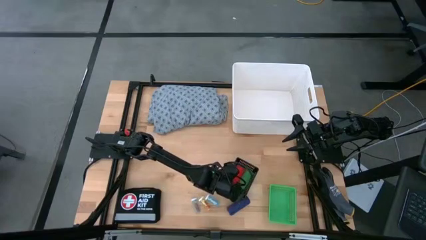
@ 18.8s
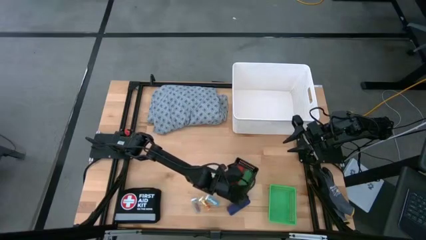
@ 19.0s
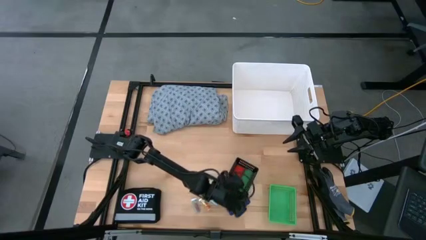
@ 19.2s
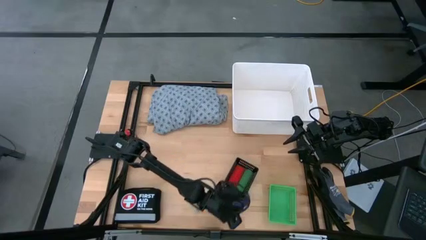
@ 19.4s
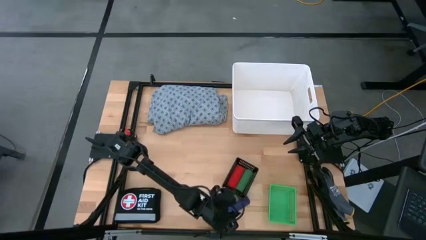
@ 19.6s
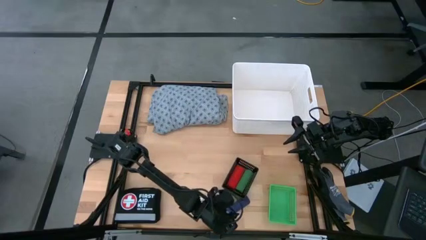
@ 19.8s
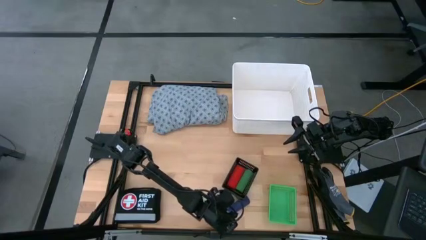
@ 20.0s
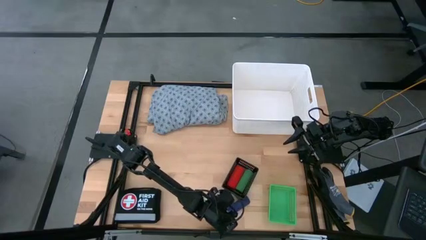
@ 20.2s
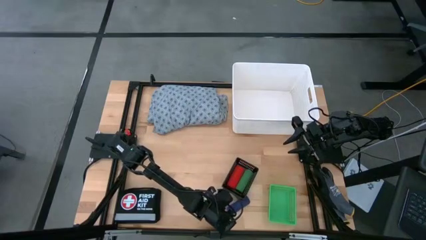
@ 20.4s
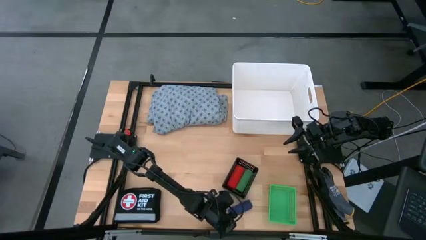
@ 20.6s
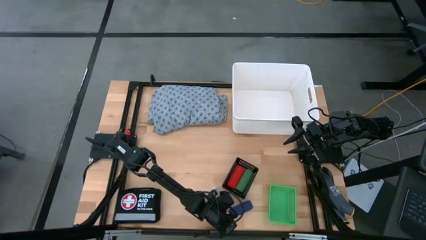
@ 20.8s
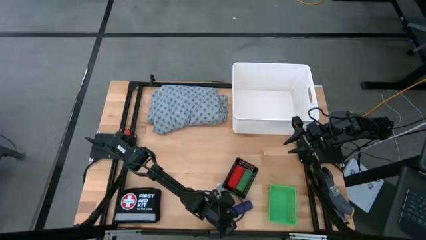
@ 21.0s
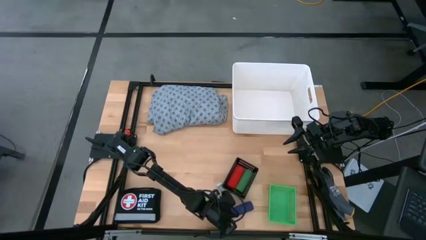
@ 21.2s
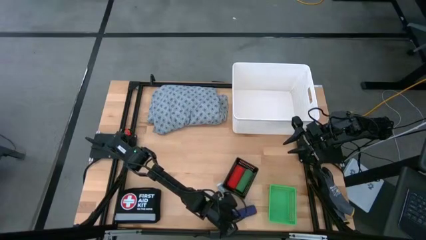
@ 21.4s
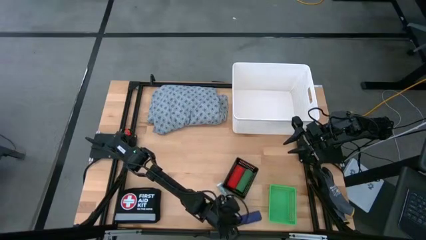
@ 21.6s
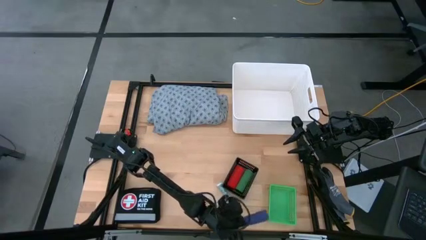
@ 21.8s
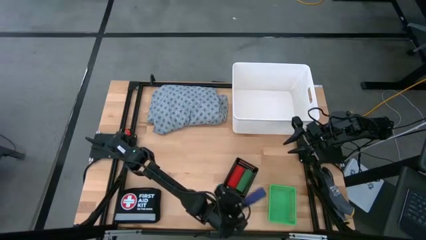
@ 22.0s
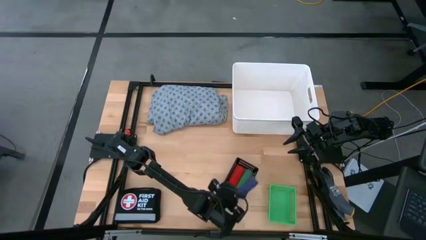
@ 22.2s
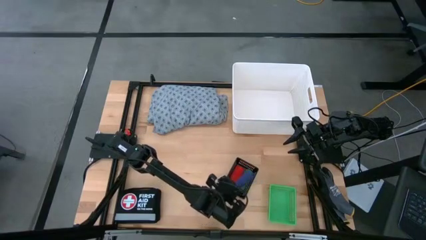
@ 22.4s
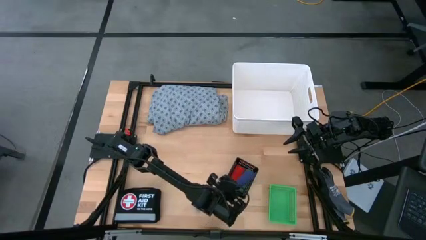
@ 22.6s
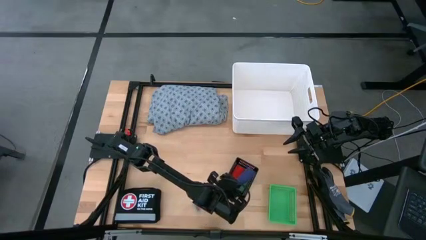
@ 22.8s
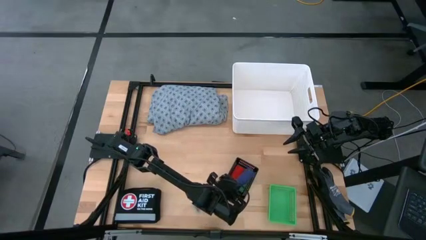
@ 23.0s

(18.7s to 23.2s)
Task: Pick & place medical supplies in basket/bin
Put the blue bandage into the black bin

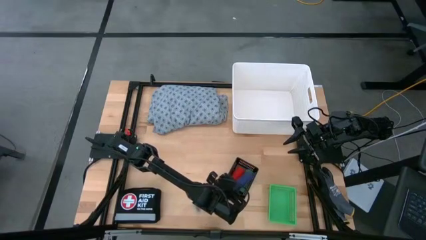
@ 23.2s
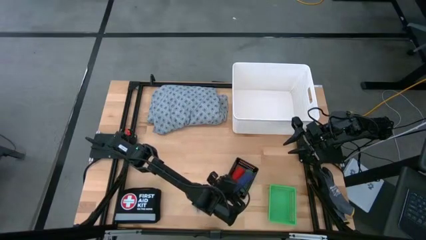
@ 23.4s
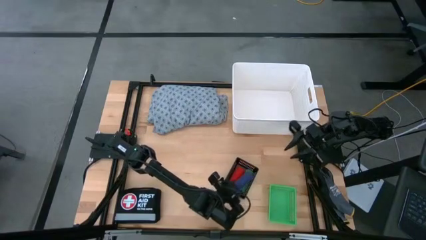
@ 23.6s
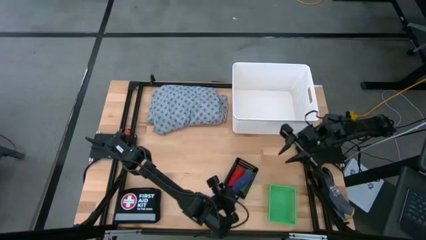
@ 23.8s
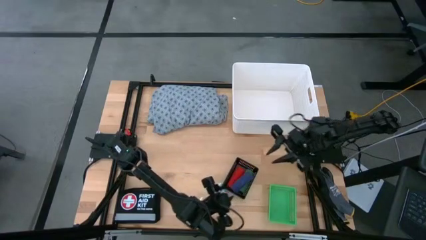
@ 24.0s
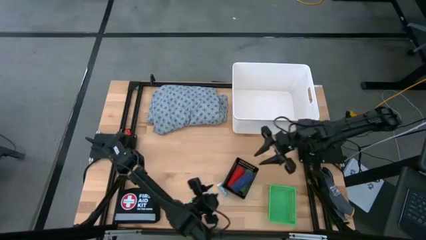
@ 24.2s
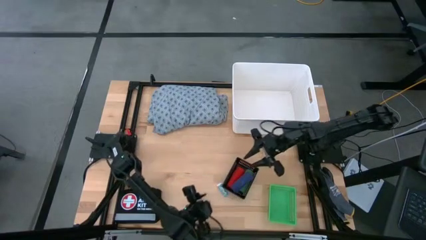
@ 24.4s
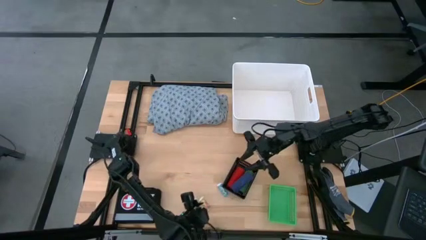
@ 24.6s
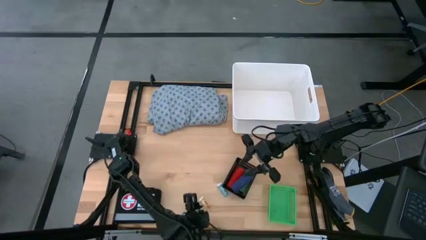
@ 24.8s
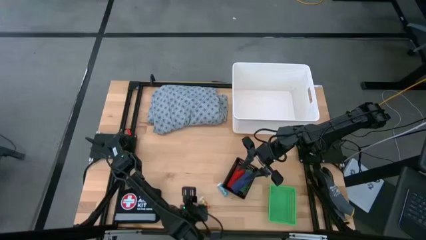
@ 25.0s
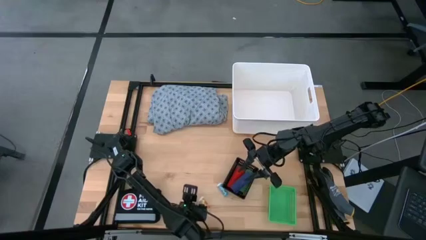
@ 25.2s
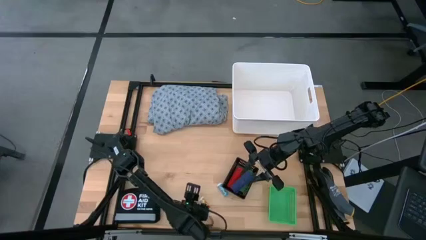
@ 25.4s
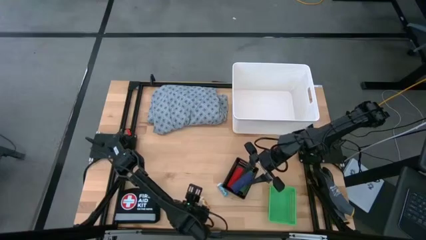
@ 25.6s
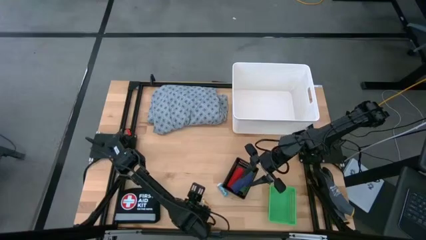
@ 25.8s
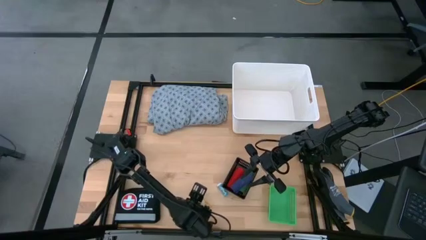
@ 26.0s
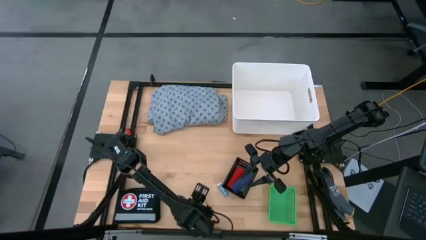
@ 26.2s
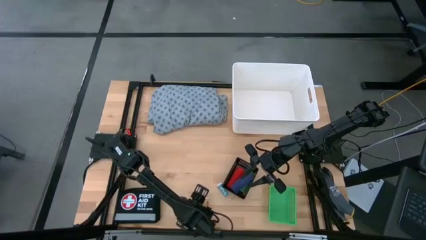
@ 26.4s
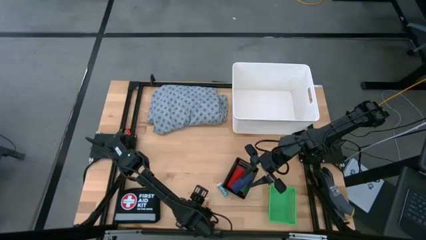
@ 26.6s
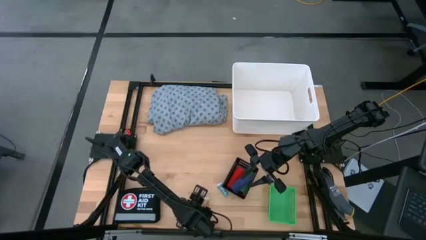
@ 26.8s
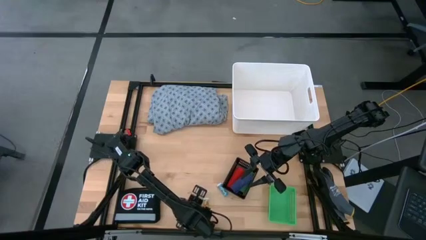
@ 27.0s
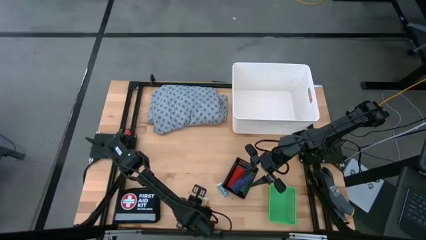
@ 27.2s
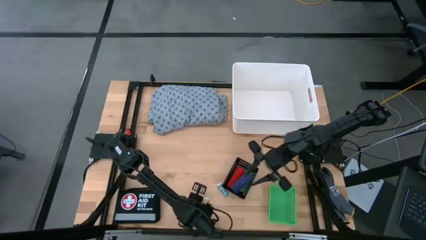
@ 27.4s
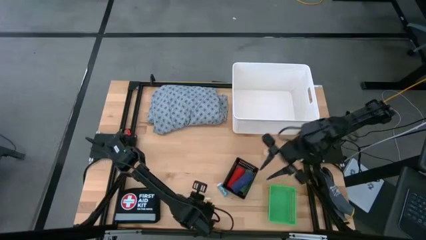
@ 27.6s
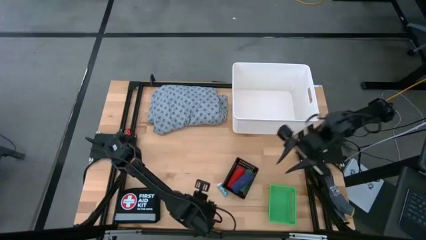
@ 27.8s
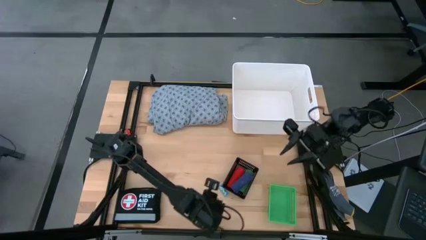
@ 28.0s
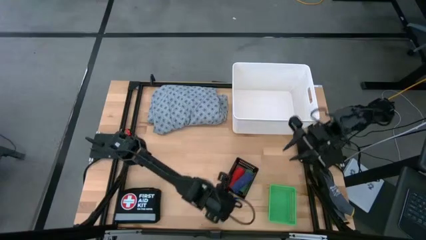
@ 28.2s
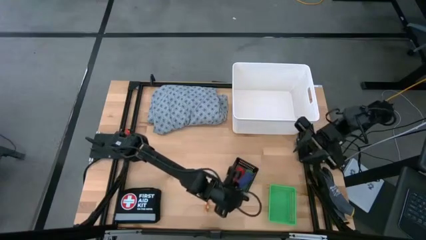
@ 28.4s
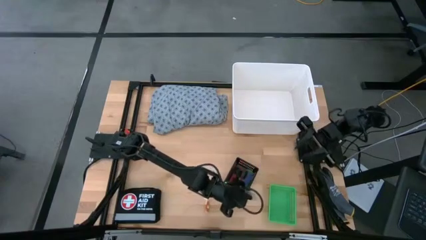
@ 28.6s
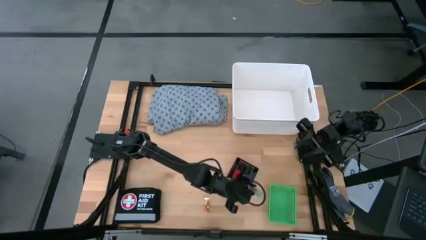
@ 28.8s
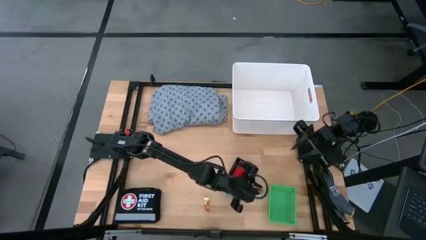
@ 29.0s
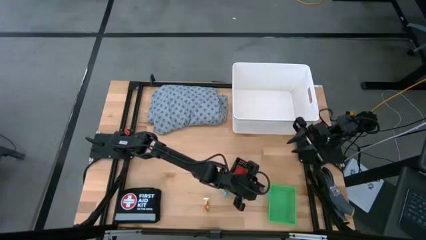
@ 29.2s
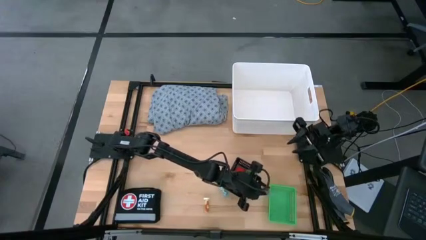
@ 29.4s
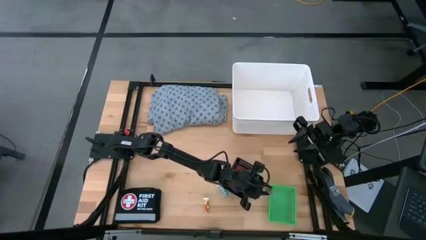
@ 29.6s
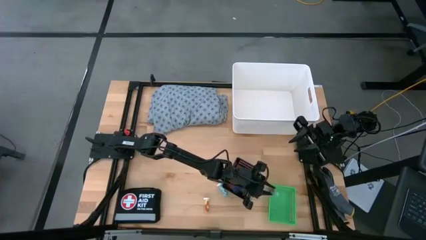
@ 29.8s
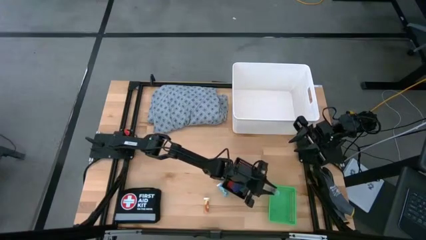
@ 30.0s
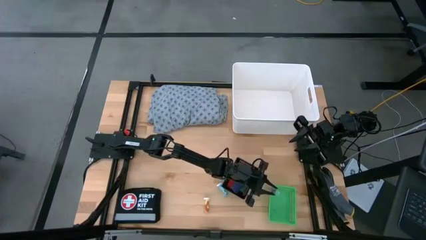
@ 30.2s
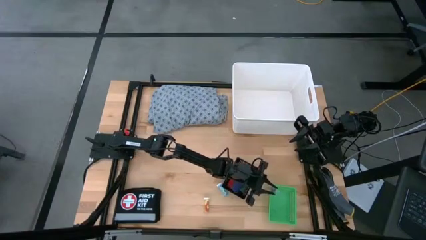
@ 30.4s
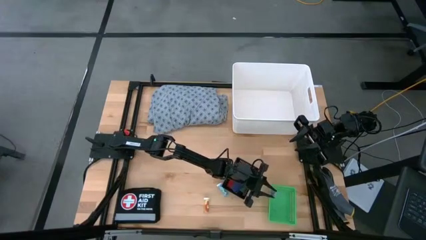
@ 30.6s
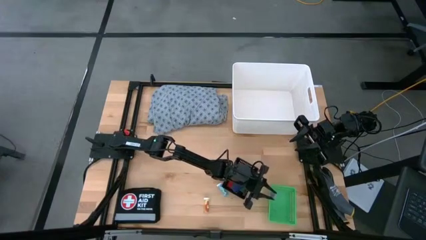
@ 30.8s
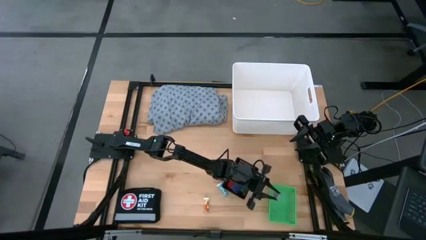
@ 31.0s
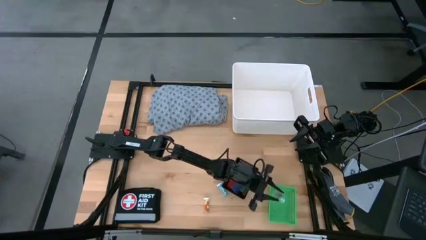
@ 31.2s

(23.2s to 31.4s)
Put the left blue capsule bottle into the green bin

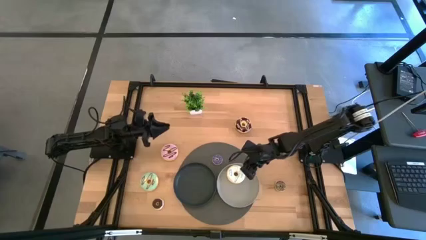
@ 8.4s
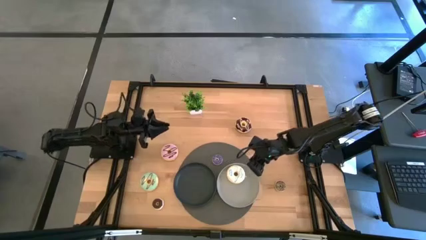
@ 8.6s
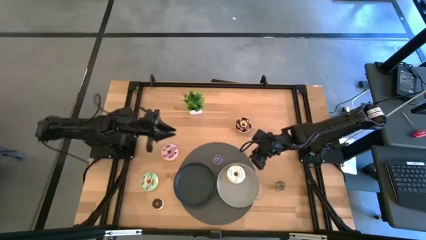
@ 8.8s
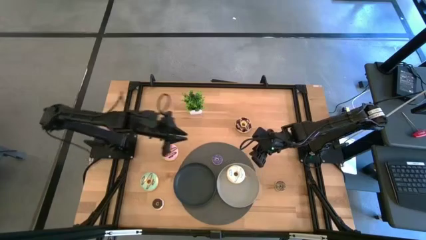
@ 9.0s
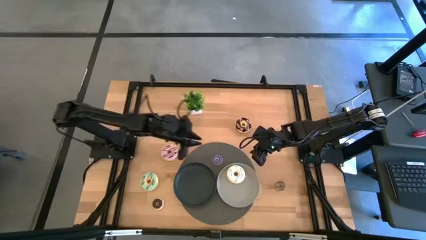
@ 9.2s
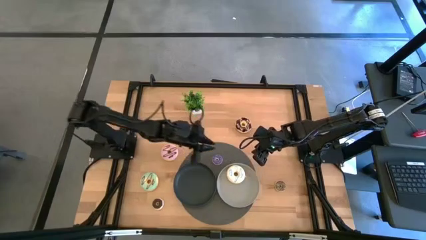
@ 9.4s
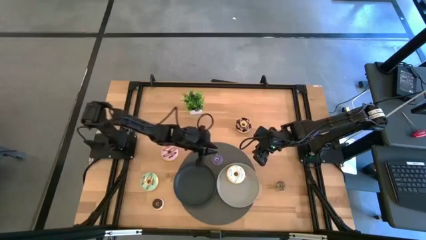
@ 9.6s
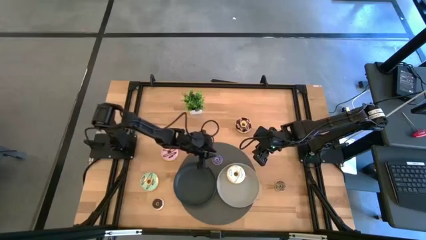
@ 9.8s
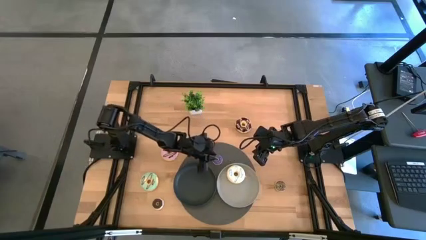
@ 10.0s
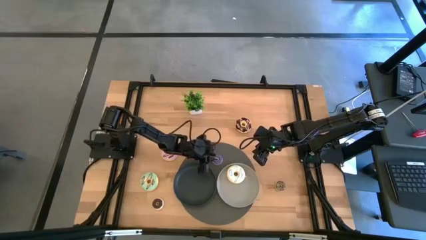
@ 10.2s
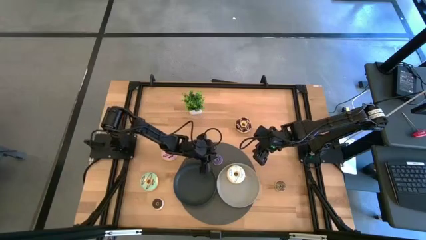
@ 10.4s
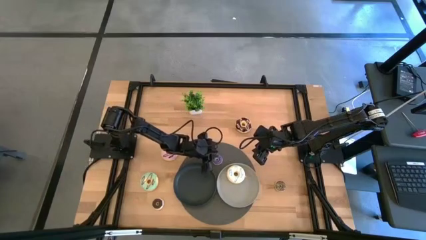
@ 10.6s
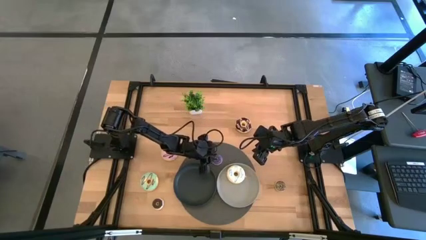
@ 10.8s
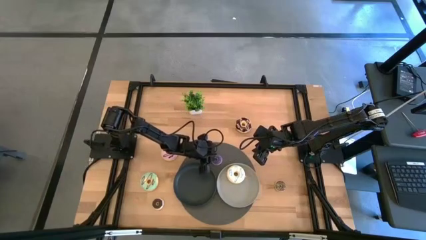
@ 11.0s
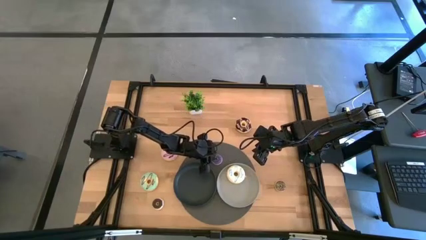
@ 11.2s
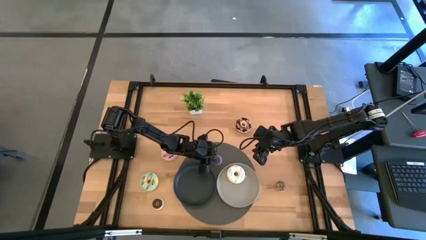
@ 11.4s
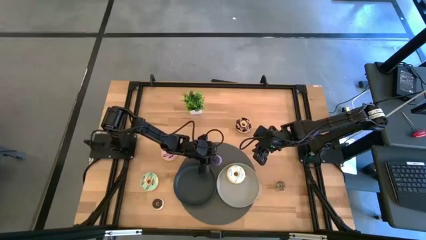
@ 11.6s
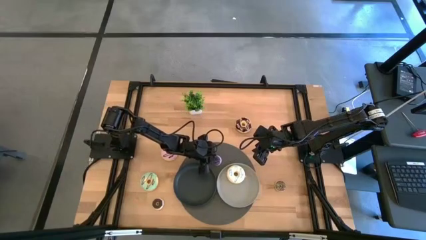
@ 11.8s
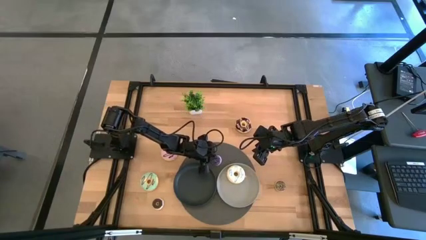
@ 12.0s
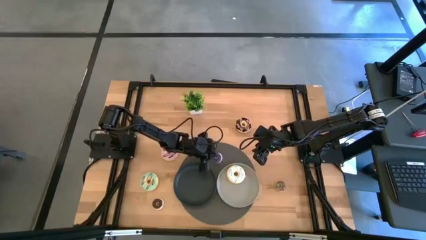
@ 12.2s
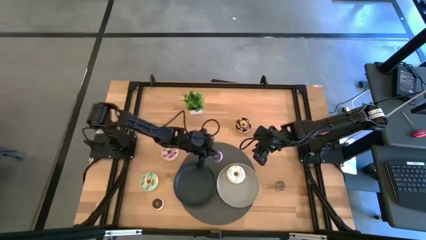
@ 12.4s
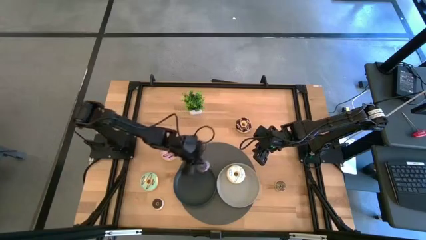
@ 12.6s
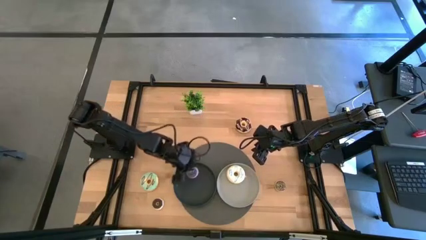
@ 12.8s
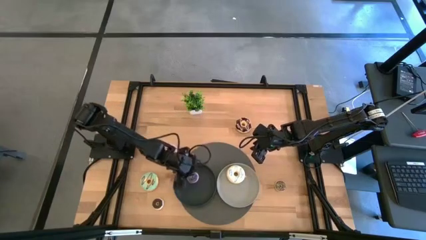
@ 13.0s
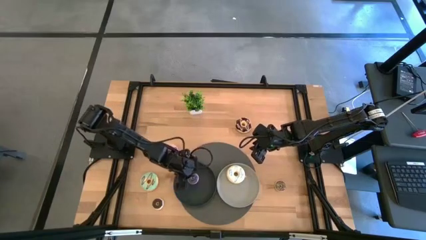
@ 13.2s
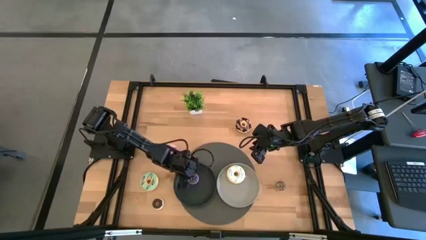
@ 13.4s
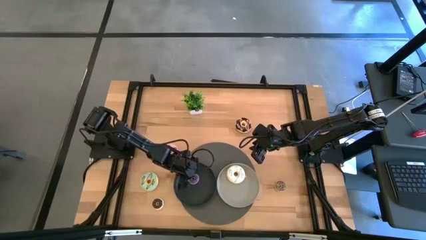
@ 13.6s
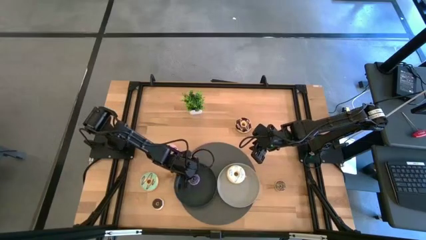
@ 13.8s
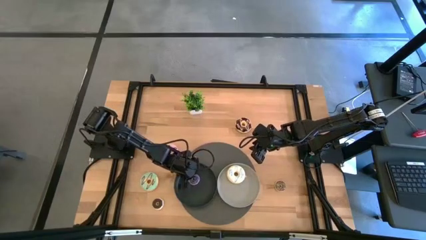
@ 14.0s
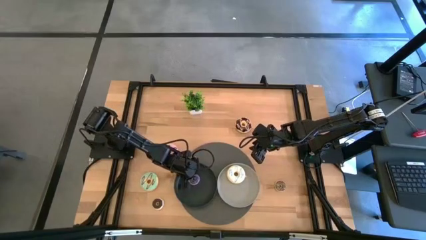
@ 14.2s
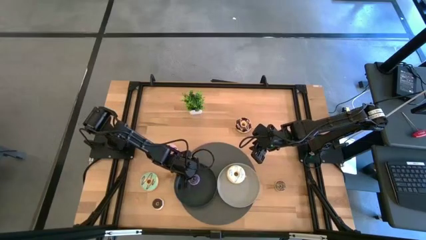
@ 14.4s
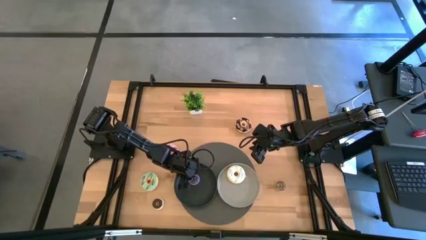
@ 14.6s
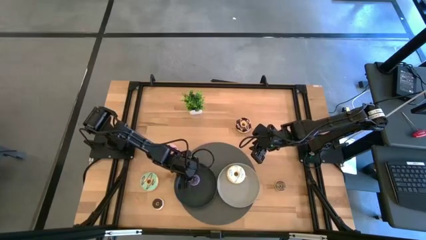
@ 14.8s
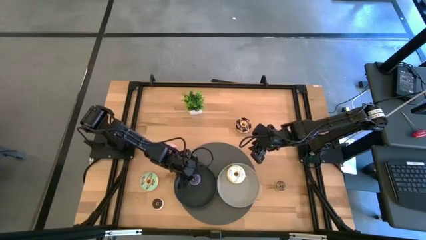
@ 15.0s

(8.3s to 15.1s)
Task: Pick & Place donuts
Put the small violet donut on the black plate
